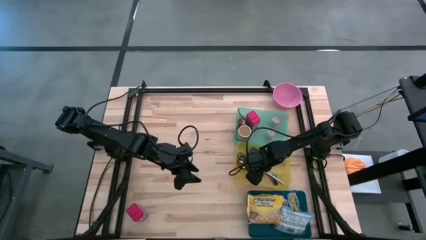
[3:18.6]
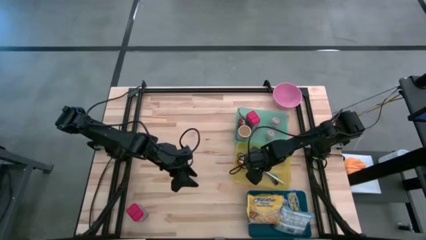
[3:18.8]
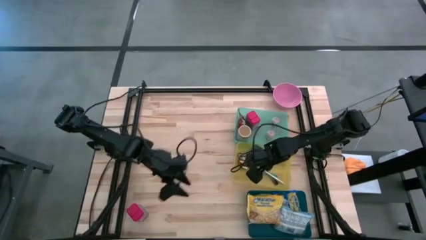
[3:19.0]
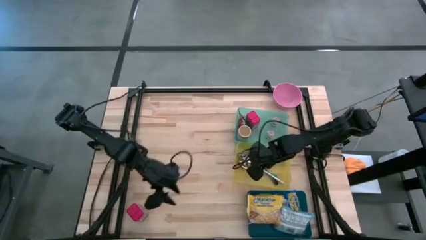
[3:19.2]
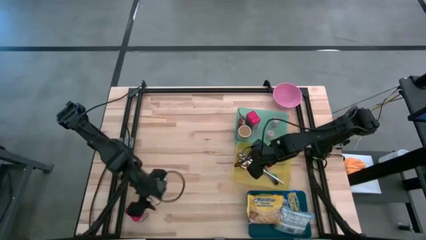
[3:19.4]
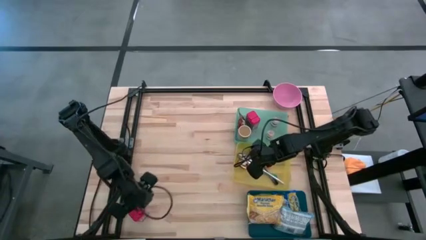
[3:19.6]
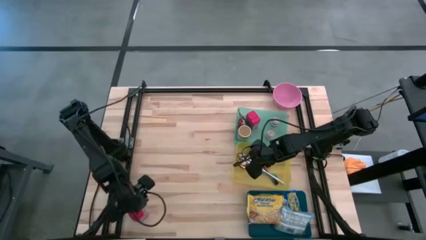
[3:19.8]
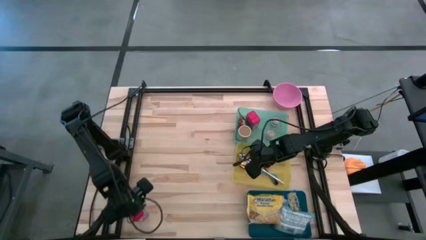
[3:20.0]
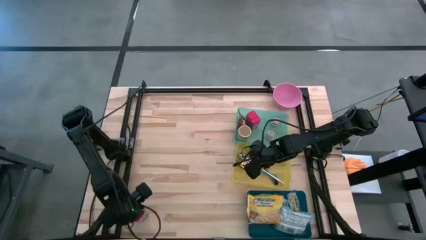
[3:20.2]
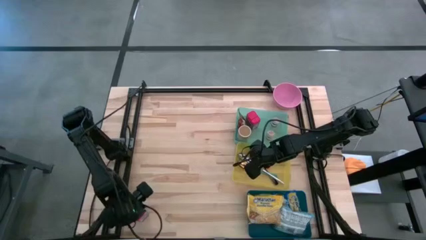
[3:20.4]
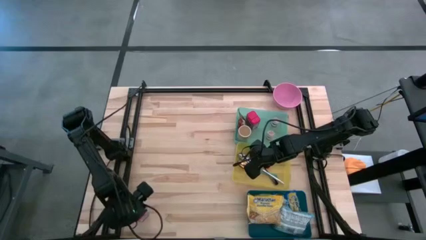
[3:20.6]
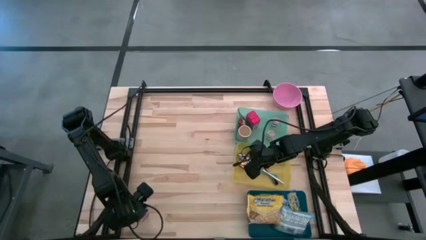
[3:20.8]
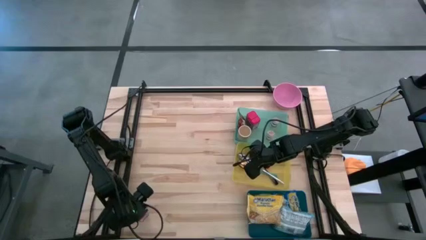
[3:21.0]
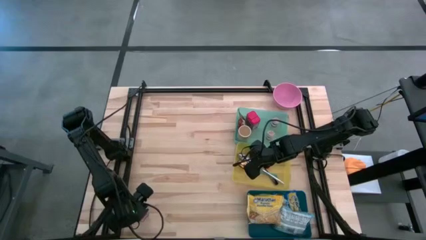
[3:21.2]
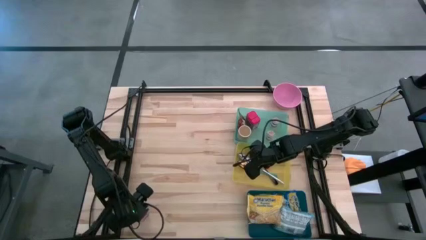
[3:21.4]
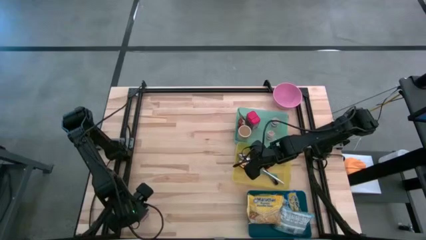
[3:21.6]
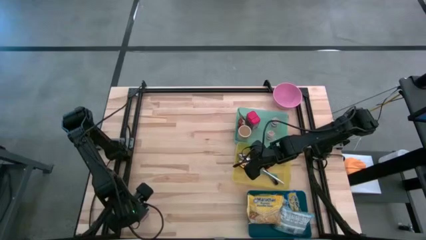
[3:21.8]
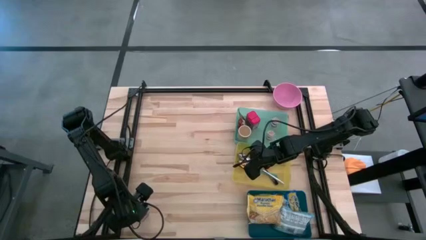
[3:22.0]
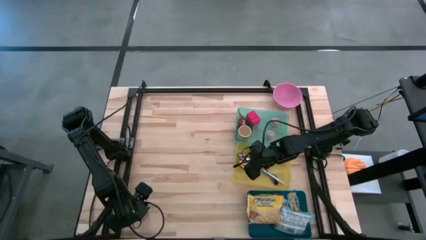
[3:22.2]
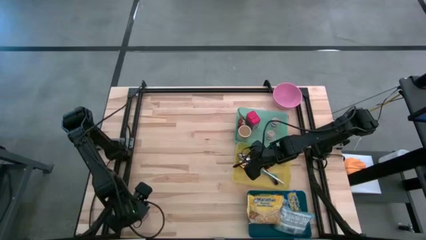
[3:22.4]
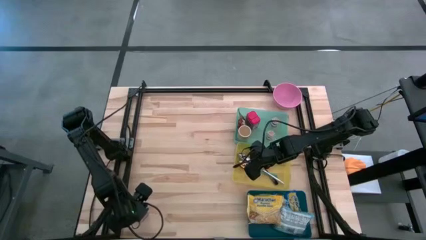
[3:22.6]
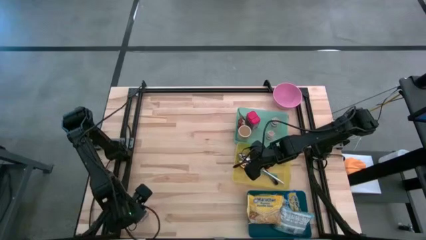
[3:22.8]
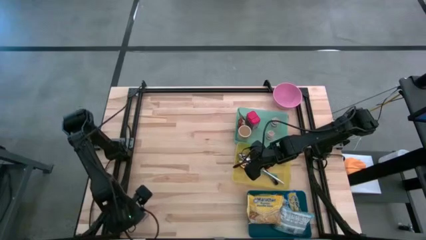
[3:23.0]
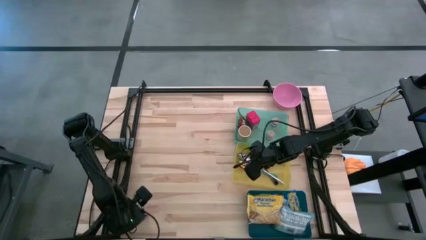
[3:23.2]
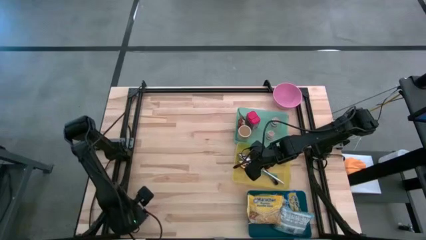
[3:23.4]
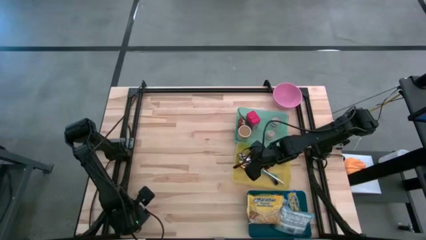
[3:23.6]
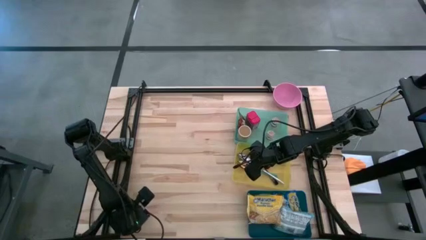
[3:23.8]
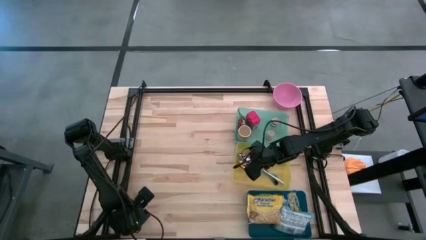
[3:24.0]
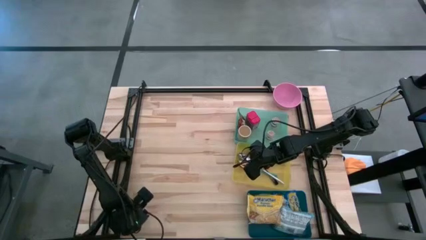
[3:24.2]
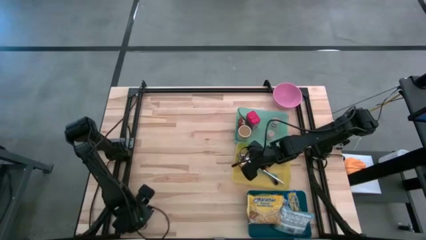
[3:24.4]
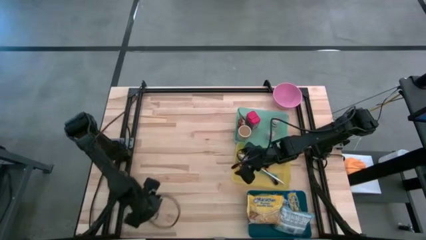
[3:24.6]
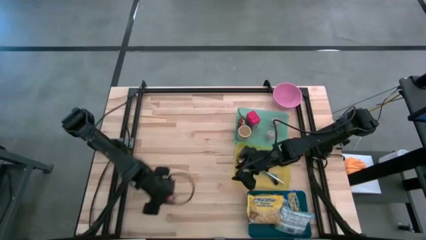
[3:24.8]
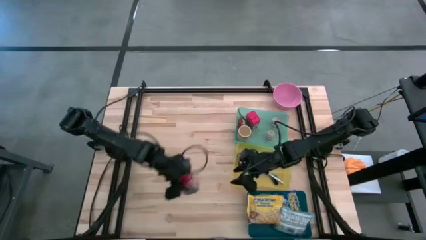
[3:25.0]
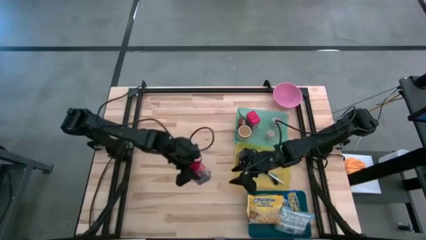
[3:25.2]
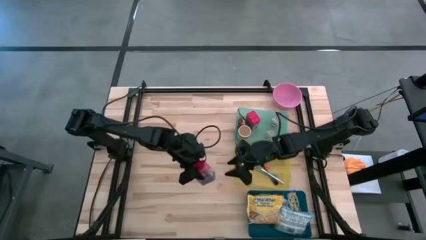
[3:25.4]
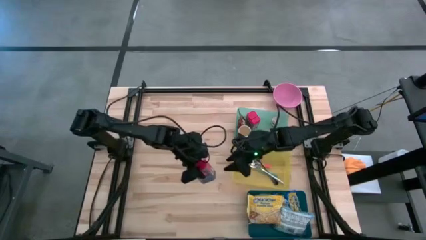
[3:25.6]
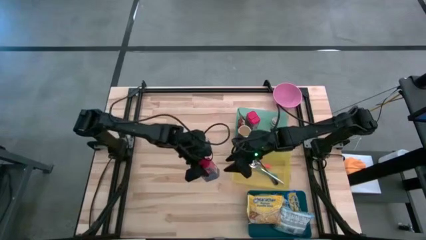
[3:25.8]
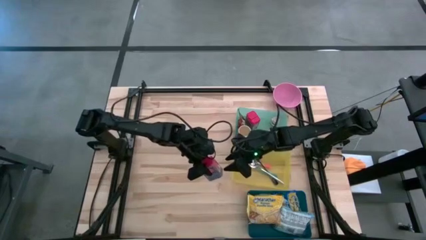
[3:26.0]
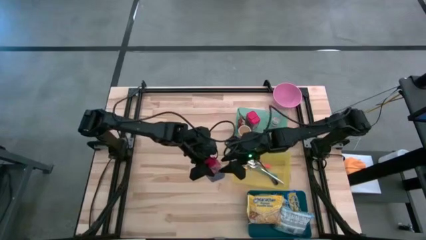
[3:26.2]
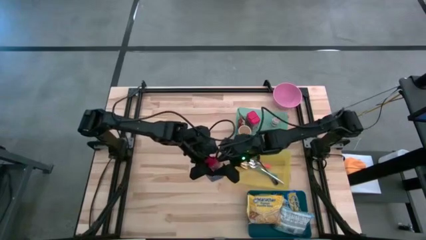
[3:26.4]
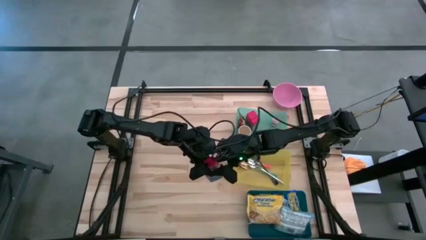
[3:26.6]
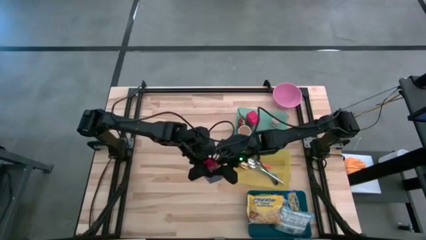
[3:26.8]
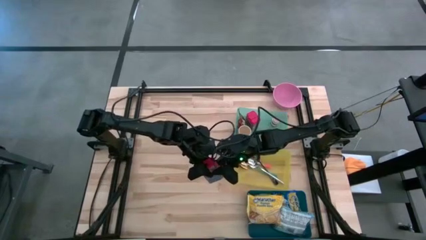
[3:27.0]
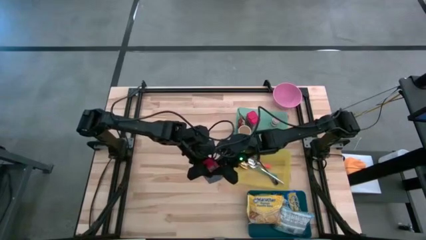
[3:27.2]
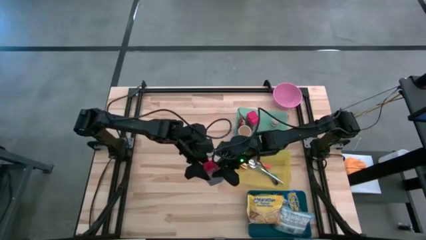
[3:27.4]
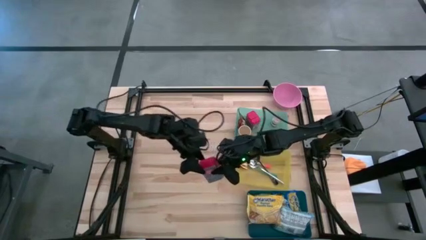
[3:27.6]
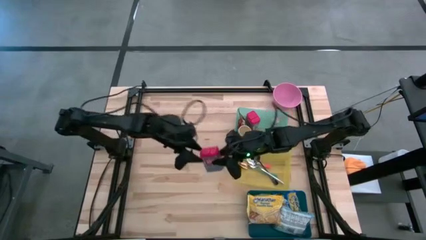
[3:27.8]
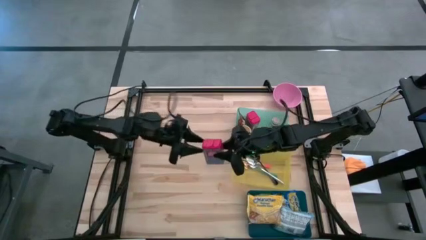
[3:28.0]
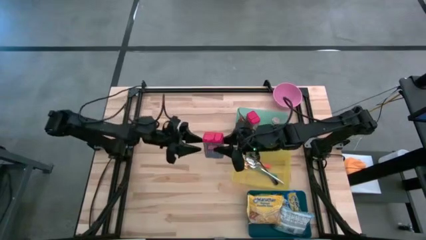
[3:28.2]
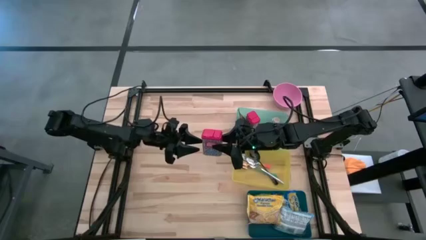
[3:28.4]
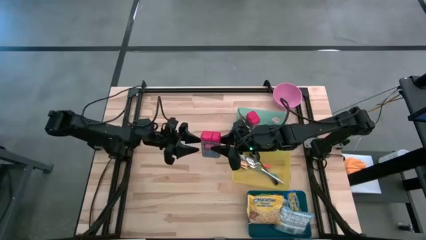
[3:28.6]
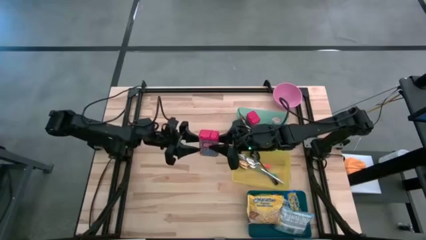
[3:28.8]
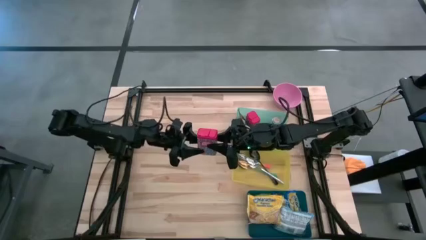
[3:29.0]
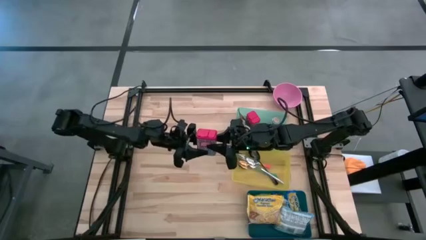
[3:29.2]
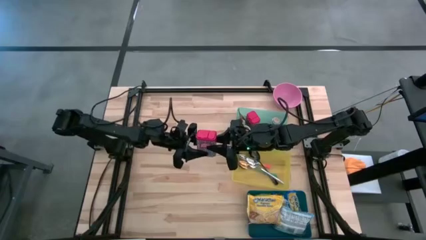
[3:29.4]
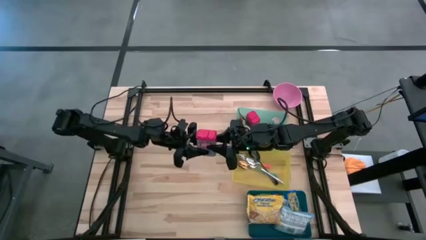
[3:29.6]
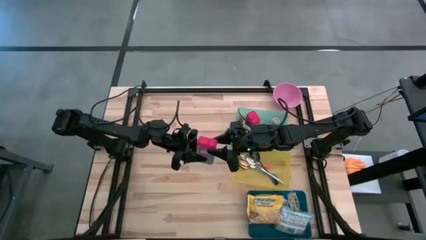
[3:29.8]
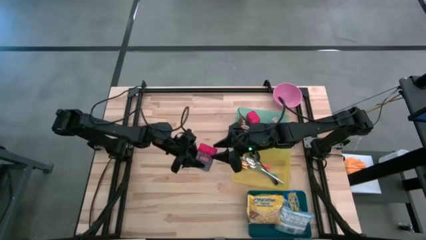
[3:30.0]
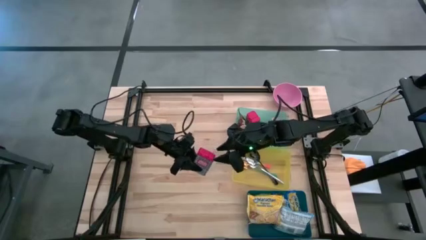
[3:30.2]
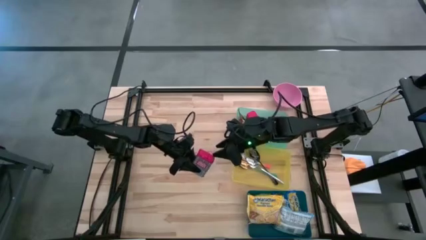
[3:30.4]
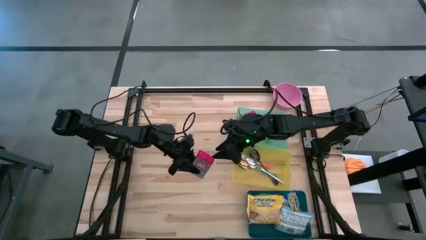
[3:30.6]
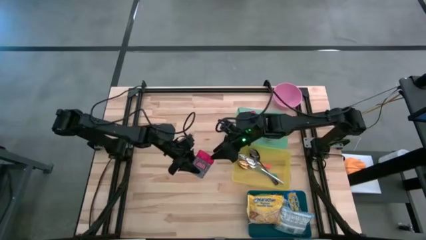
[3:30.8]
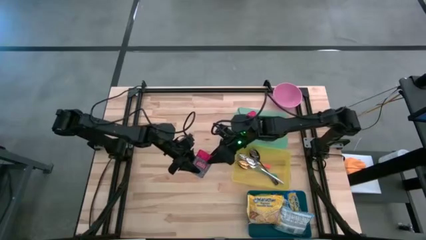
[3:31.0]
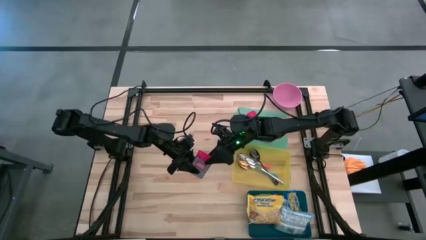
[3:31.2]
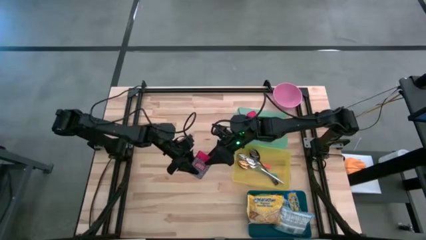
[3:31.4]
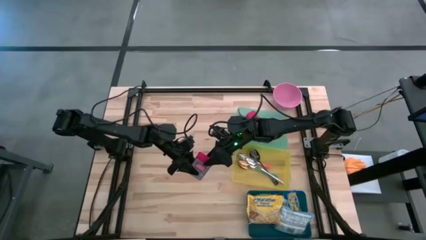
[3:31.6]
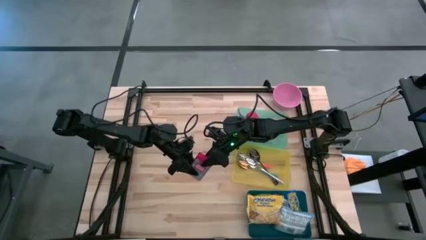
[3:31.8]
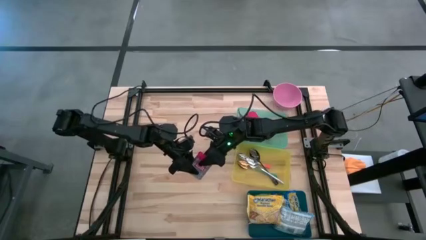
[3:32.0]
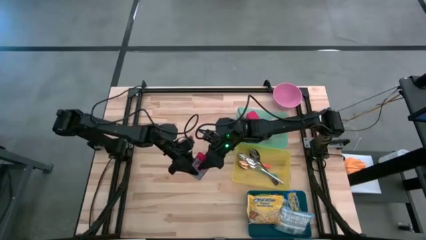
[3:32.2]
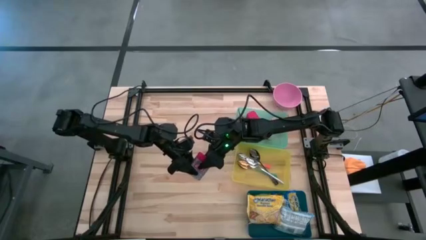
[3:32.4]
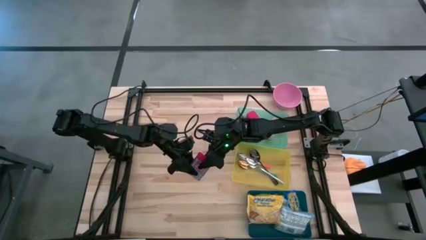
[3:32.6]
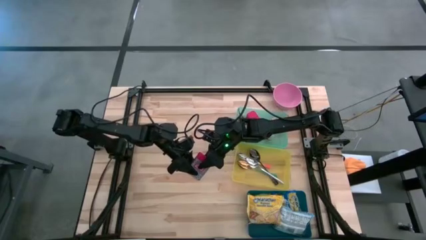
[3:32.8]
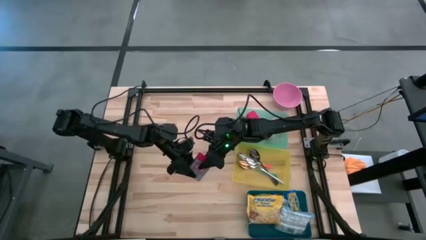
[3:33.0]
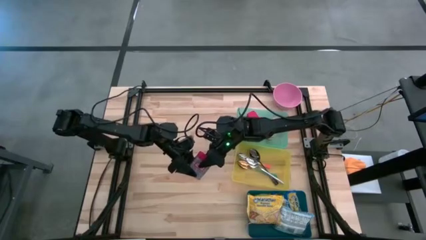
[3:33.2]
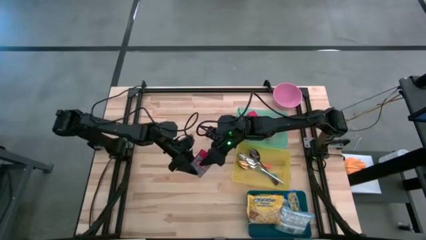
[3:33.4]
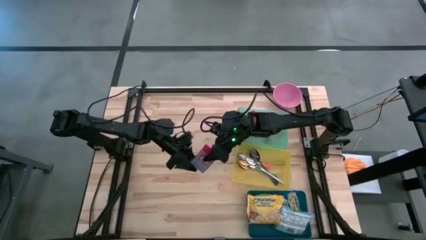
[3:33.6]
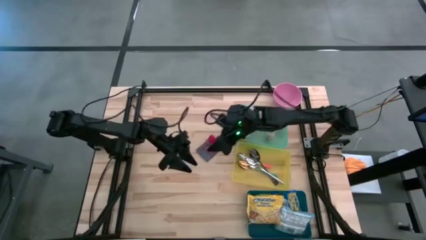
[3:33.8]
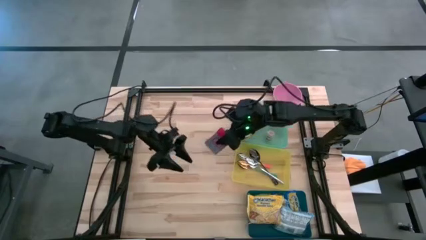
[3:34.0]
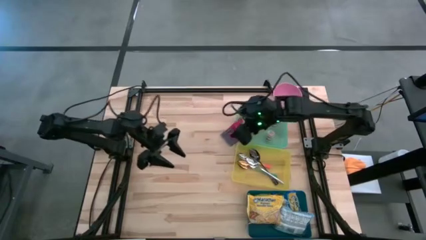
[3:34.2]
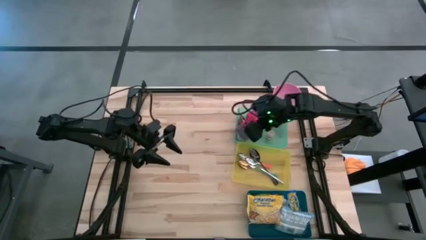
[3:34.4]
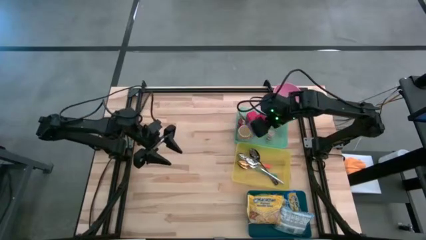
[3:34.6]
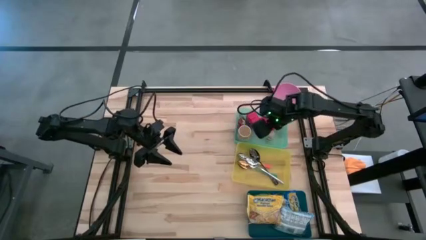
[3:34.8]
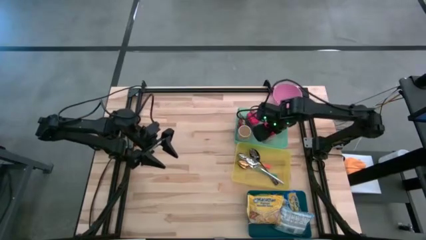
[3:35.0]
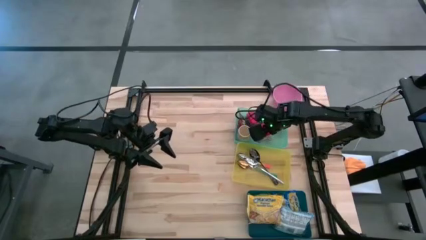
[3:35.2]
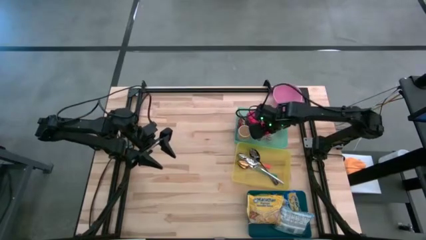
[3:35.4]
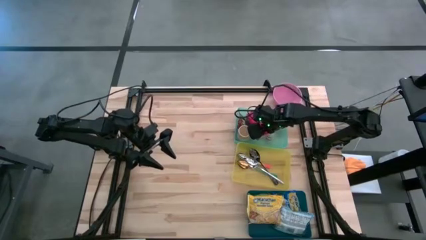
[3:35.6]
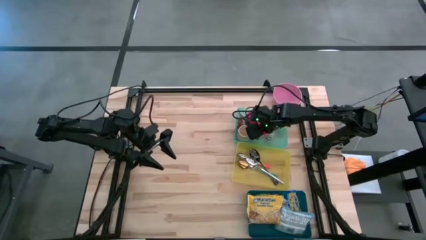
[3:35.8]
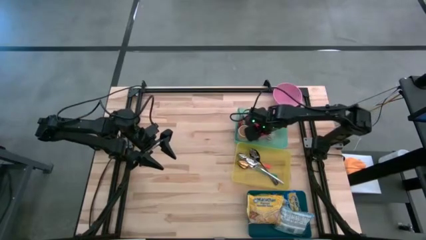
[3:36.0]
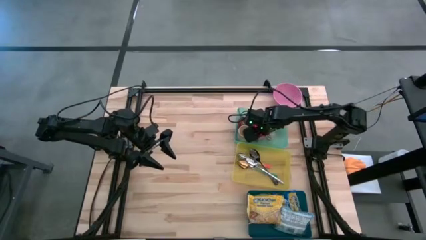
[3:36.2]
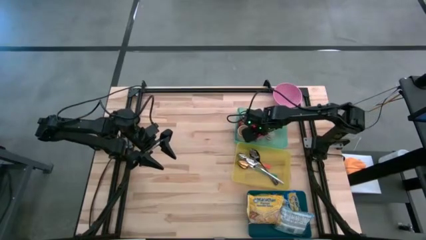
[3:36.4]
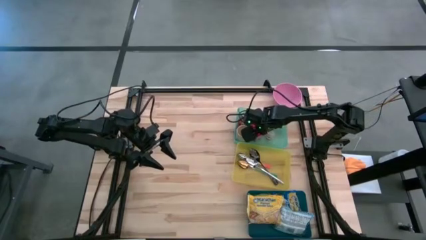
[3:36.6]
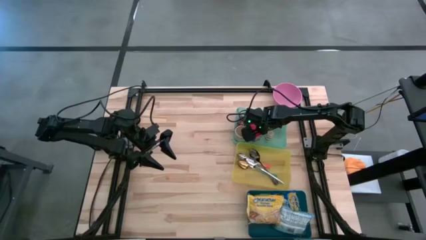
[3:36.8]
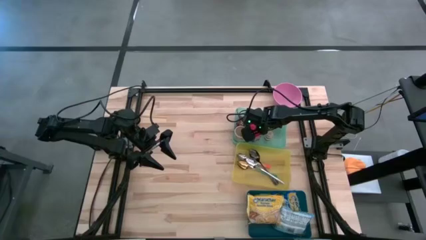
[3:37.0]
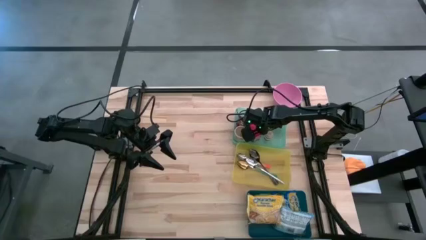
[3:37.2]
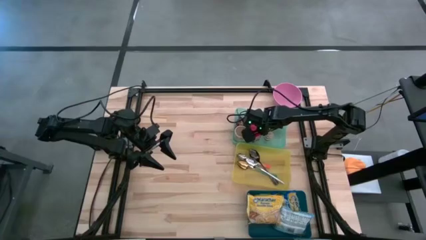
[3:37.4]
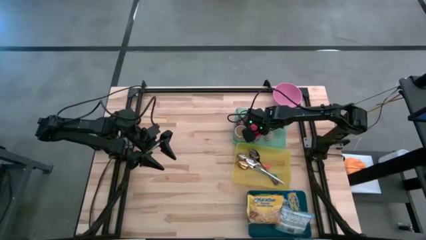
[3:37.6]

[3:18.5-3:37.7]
Put the red seasoning can into the green bin
